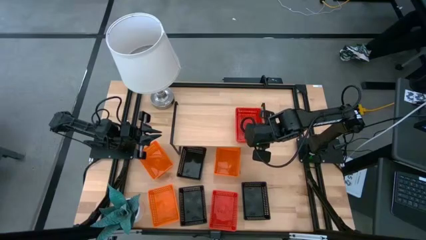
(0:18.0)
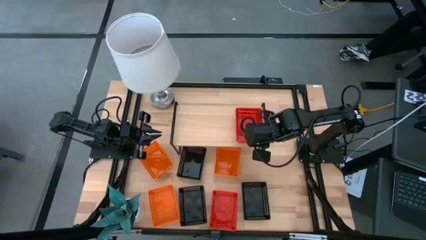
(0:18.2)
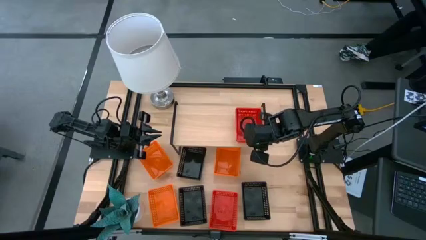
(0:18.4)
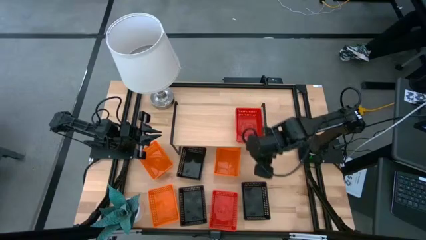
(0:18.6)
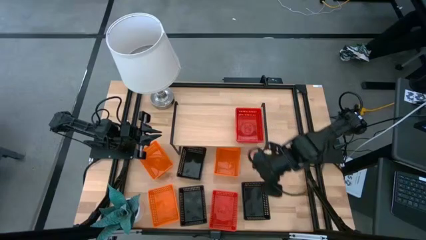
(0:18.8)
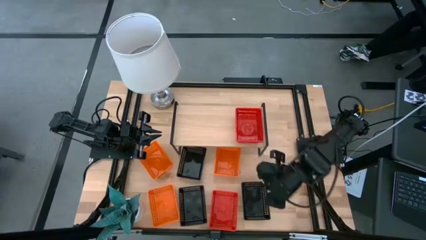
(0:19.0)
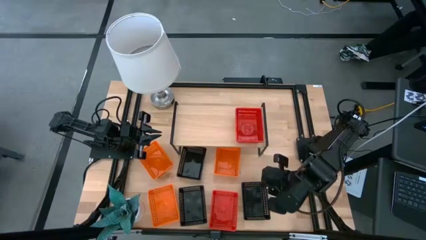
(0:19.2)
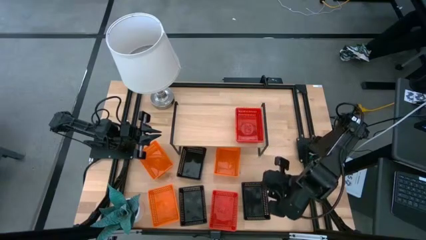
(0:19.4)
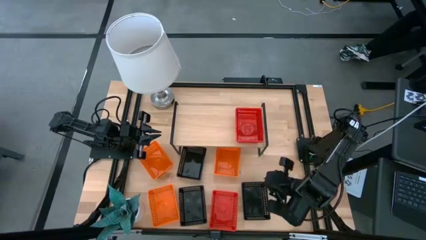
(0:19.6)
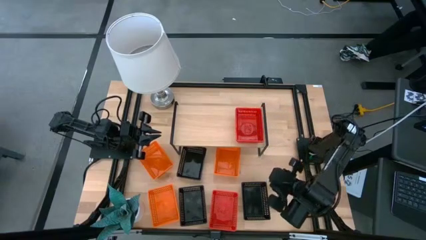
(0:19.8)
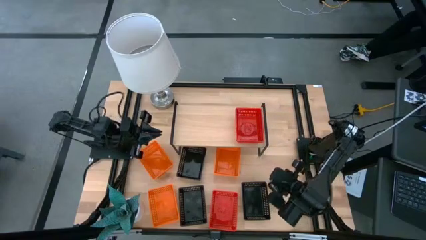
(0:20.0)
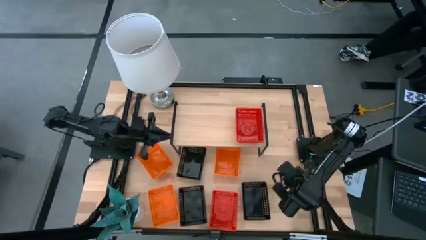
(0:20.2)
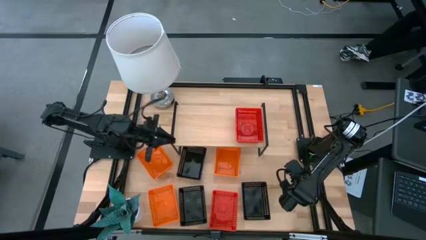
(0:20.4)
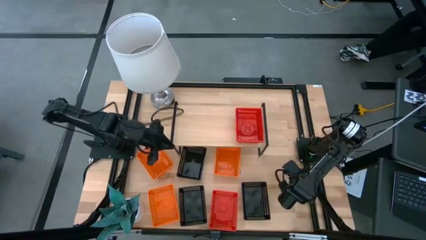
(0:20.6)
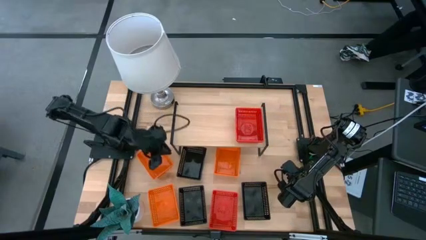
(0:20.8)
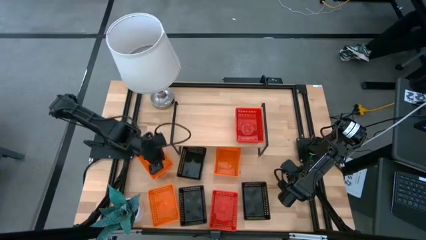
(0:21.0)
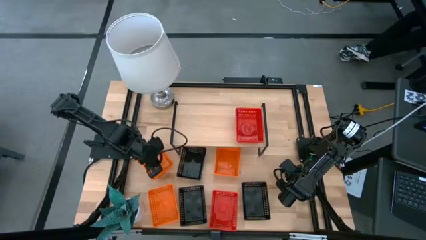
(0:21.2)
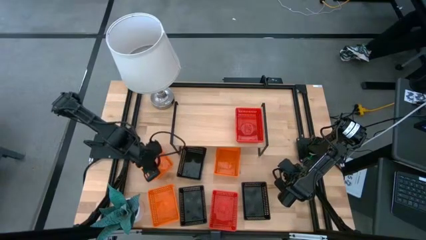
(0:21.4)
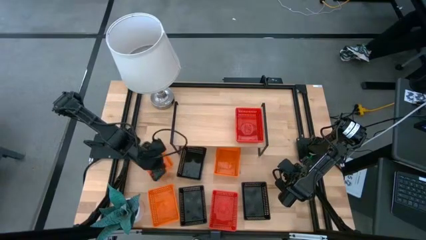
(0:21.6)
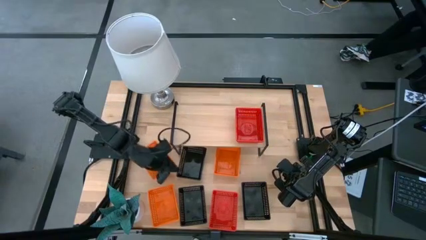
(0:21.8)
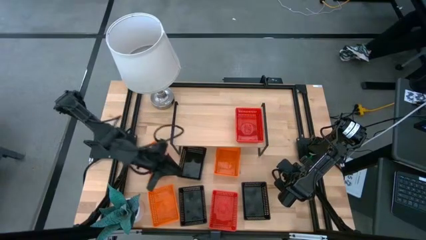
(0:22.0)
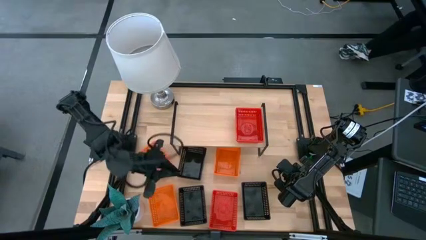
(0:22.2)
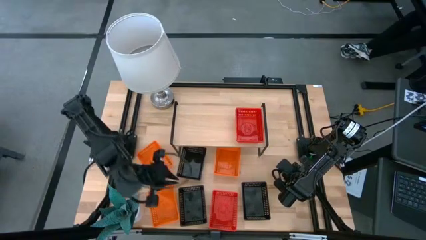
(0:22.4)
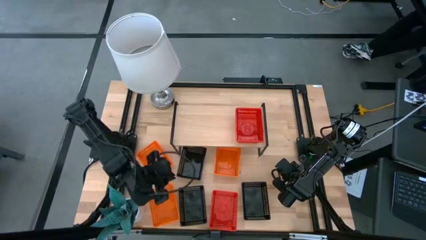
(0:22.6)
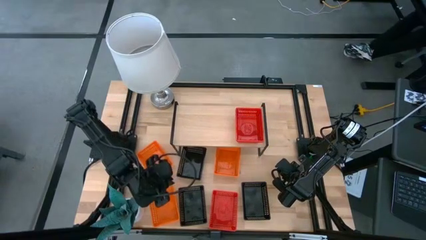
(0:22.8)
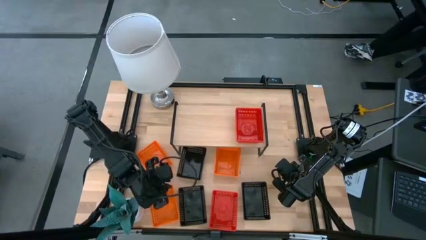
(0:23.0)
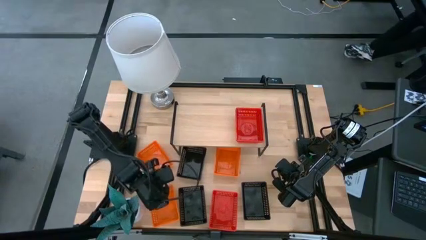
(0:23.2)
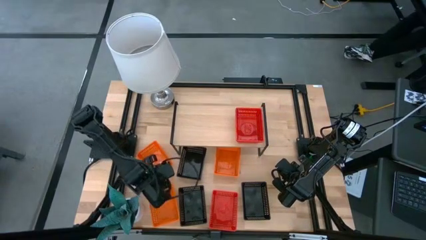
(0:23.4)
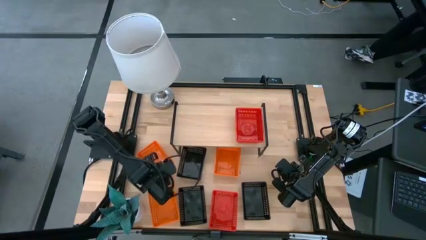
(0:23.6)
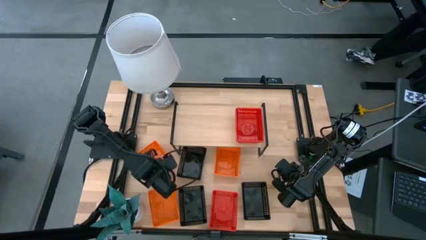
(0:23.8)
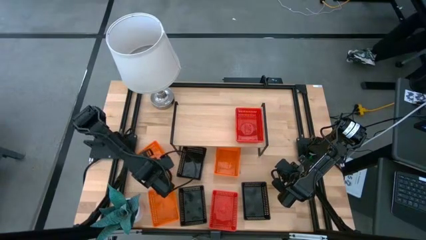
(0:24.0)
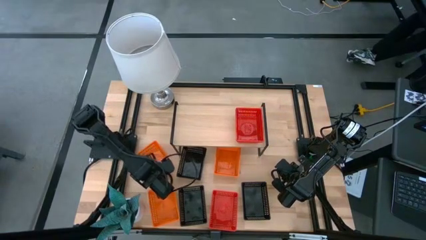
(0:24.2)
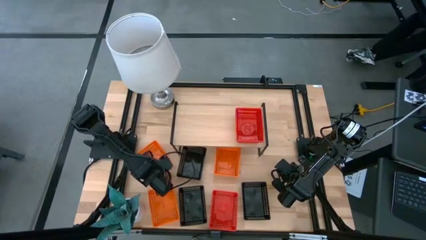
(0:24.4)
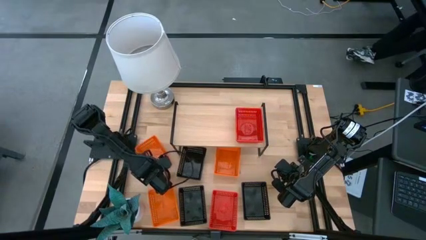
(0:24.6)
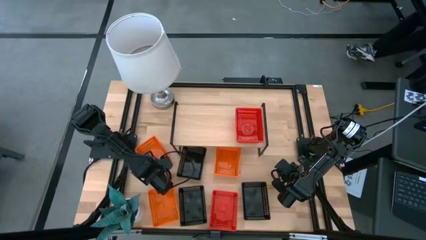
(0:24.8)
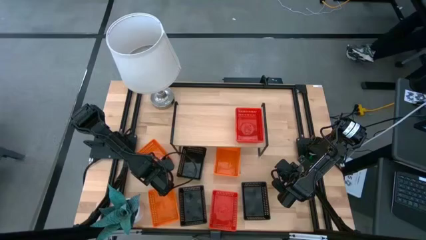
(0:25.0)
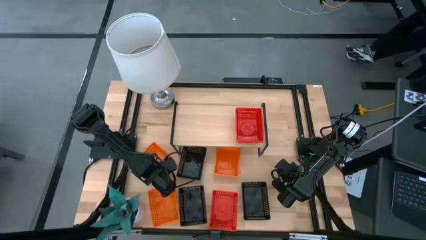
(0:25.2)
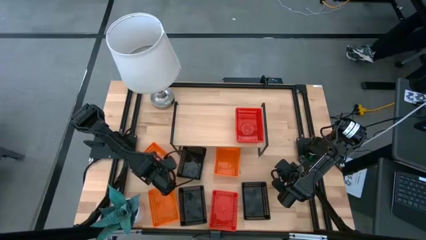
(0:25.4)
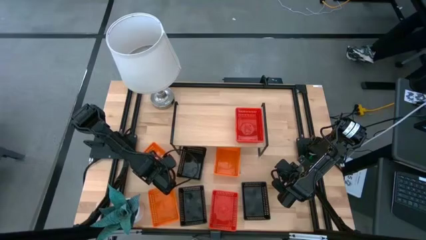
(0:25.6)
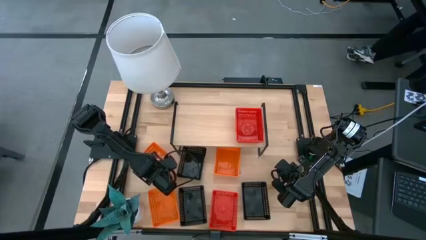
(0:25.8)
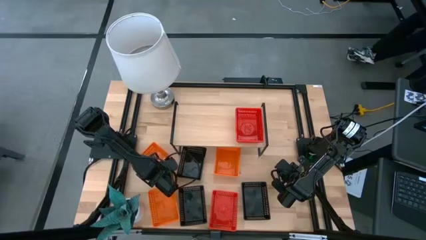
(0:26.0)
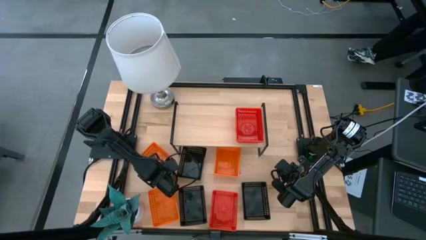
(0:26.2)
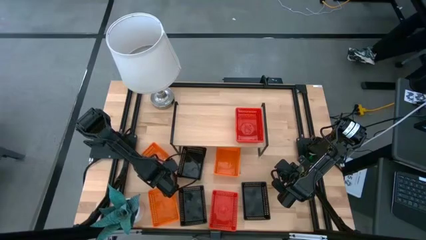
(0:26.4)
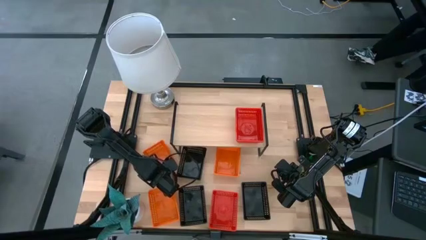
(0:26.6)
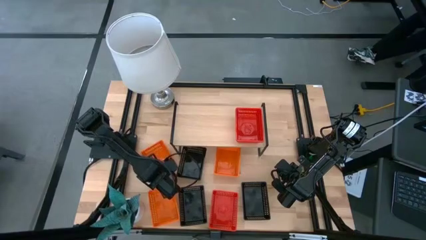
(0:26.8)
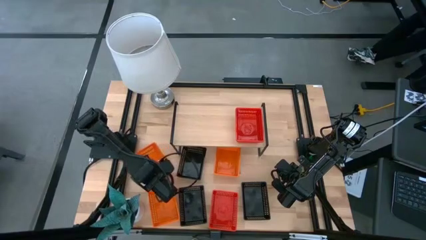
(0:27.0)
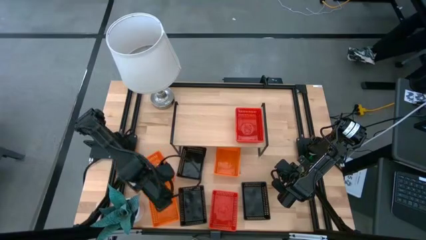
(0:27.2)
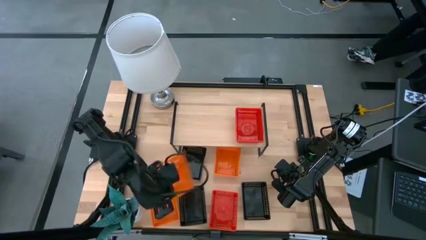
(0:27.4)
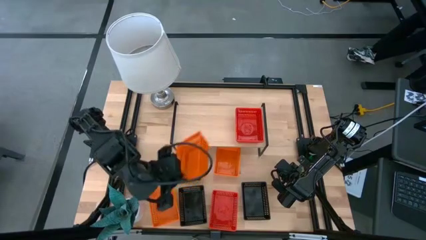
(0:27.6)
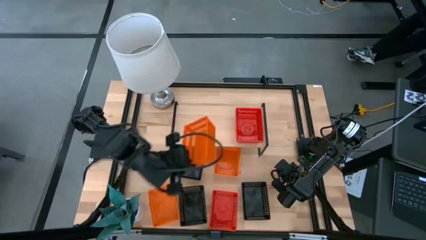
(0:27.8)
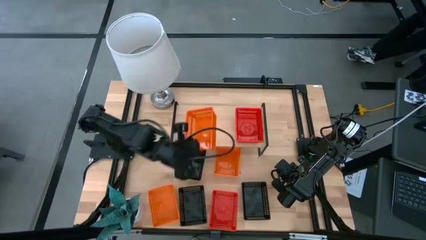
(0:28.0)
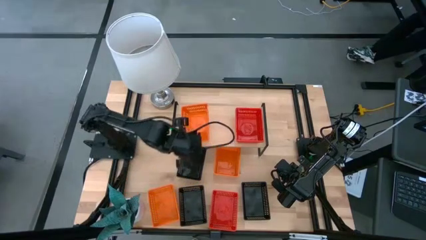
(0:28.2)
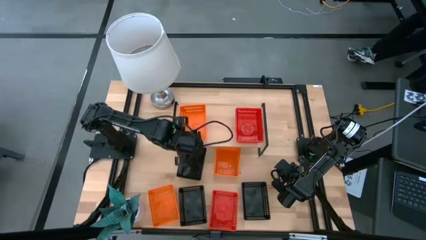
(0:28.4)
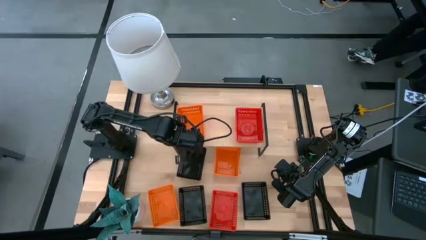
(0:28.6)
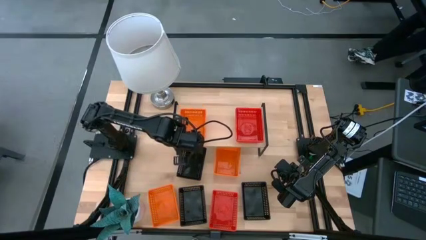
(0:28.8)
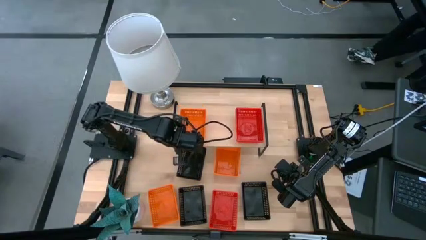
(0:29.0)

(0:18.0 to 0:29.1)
Task: Stack baskets on shelf by color
Put the top left orange bin on the shelf

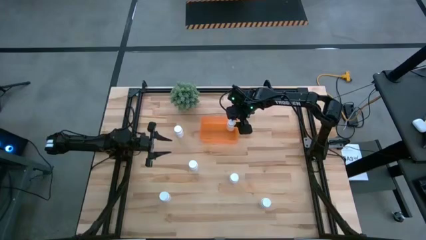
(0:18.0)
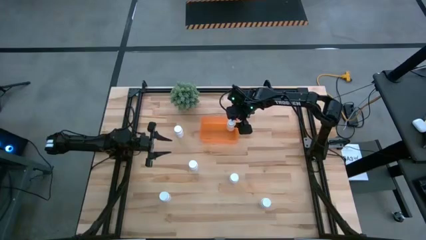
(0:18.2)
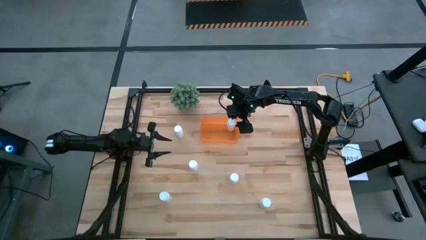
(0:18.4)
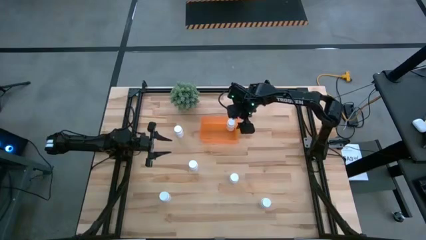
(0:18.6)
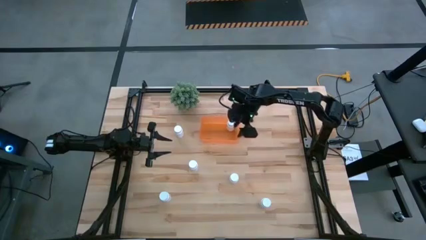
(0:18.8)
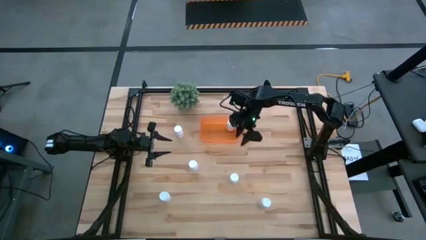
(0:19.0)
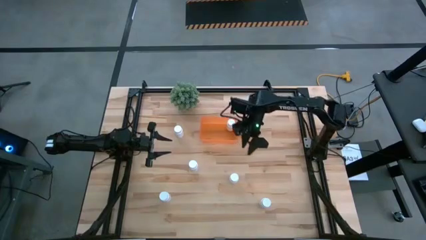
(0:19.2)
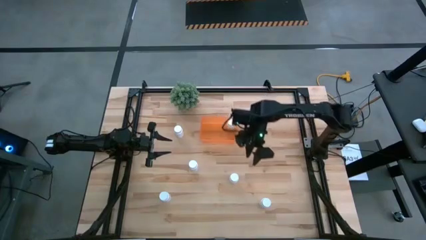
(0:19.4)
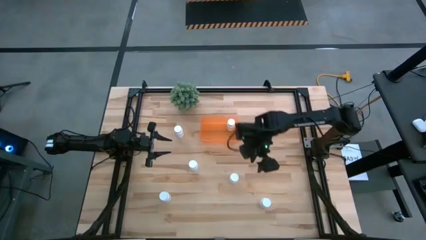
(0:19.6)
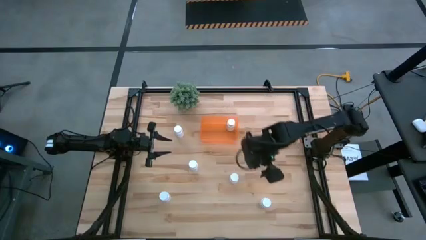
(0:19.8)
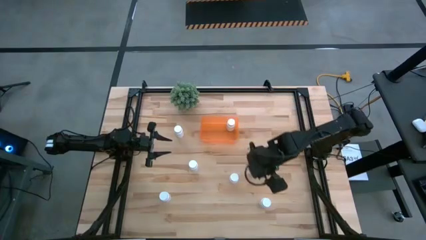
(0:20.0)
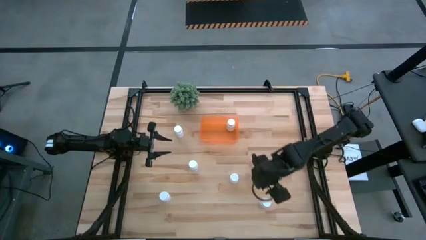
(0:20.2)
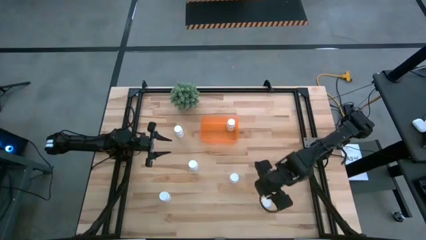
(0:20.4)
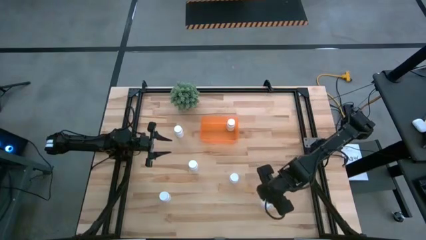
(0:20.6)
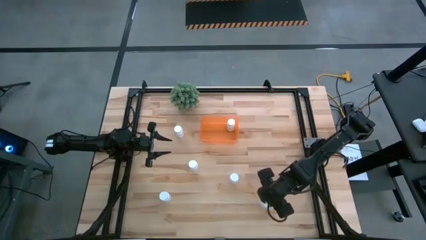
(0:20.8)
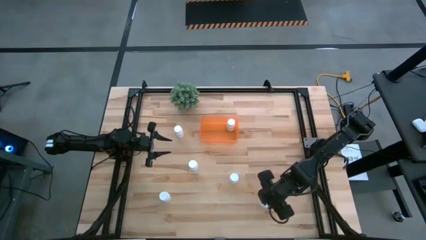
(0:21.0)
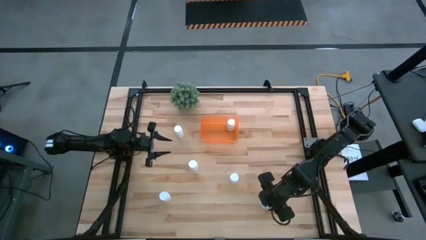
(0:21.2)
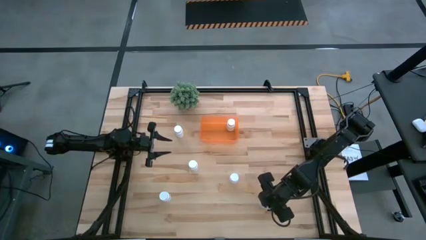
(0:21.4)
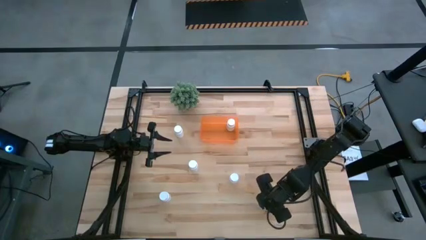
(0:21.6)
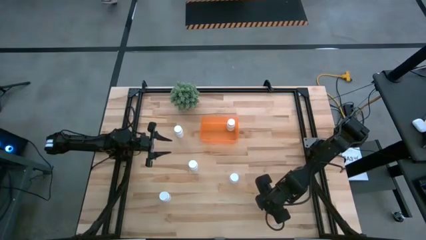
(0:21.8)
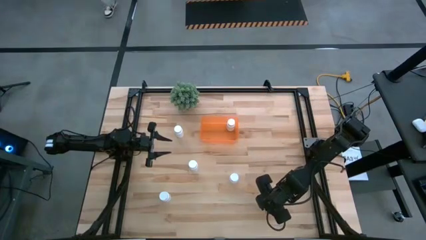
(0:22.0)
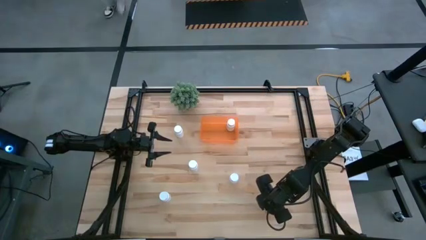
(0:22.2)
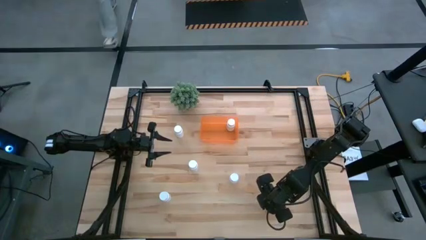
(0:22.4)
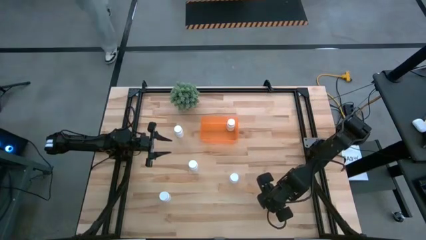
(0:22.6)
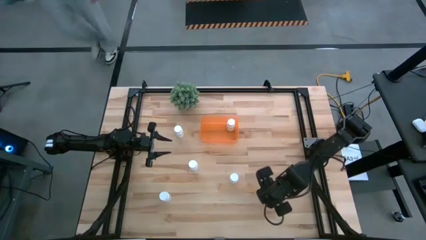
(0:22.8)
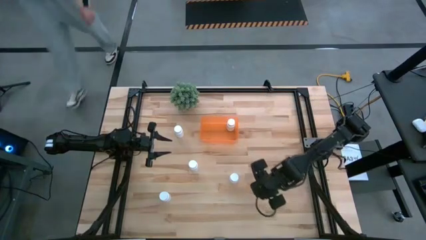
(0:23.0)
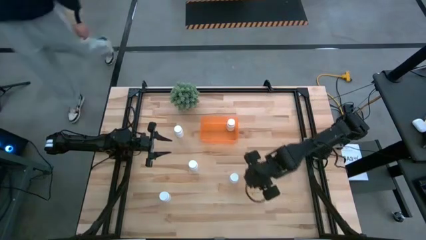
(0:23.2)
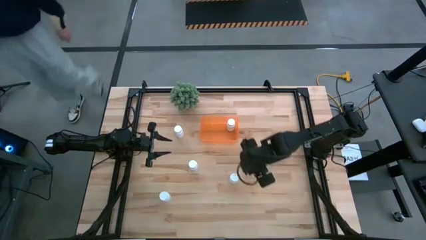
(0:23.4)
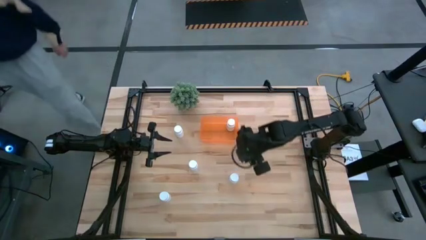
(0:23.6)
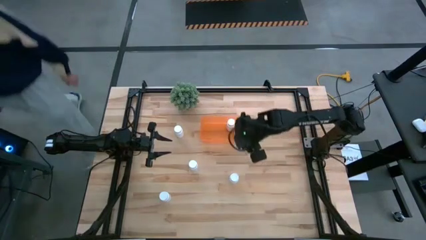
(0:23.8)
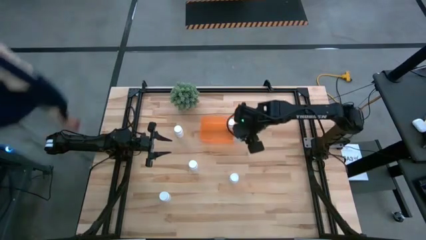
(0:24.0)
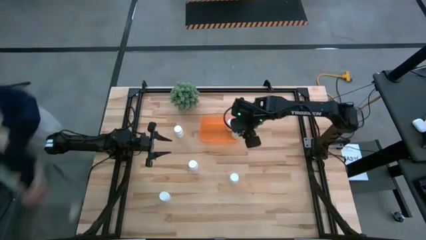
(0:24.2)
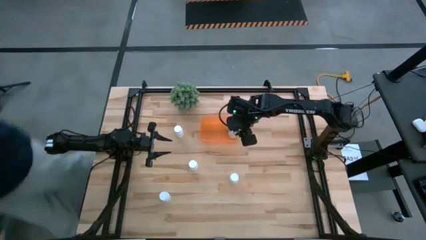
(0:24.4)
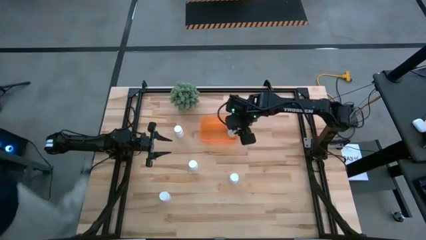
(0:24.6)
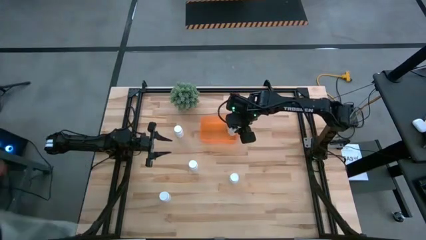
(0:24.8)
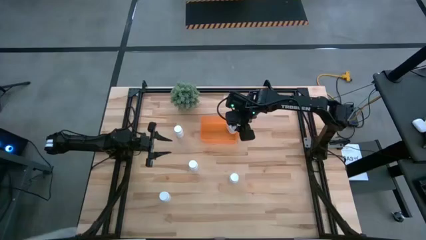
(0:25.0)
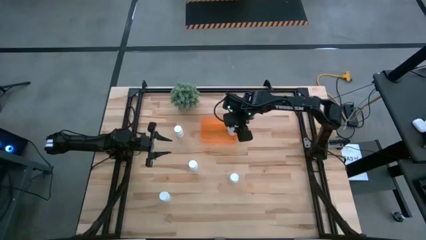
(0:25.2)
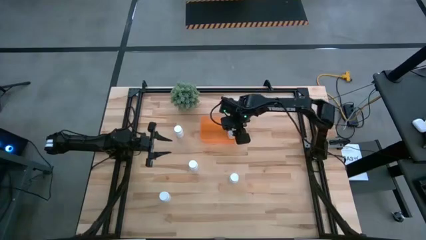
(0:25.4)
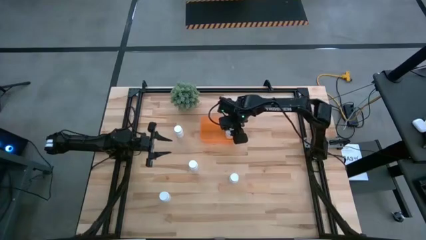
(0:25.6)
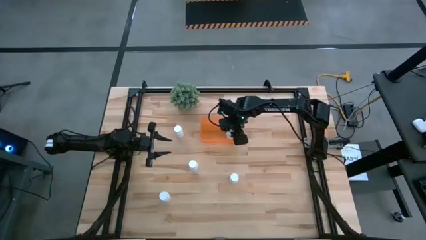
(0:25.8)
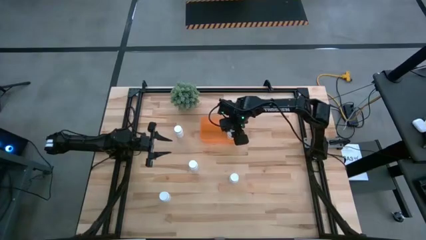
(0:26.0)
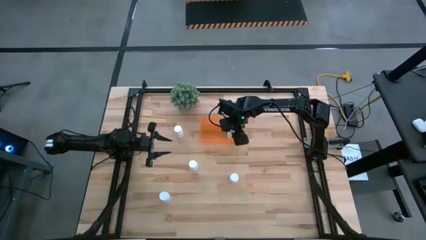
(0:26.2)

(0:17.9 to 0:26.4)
Task: Pick and place pill bottles into a basket
Put the white pill bottle into the orange bin
